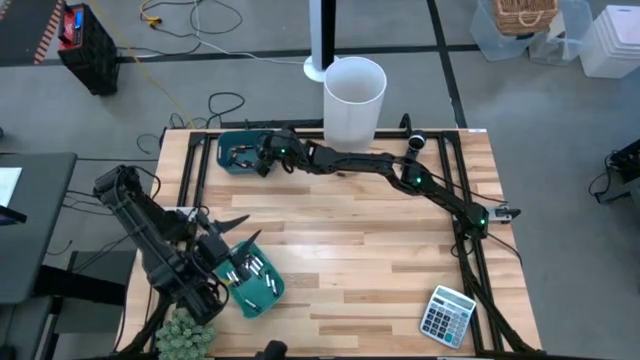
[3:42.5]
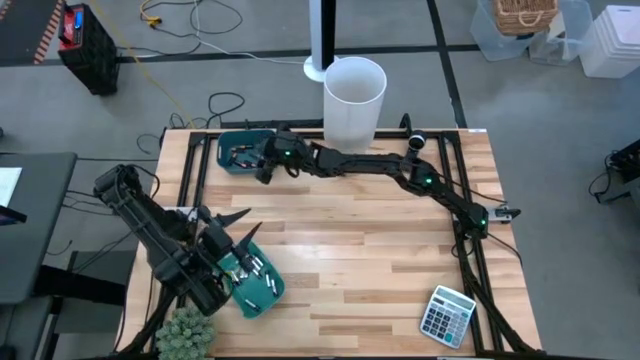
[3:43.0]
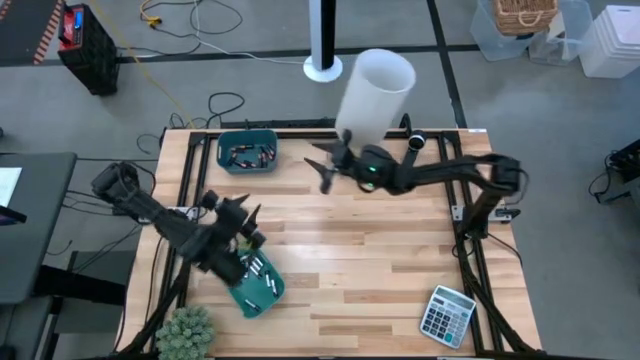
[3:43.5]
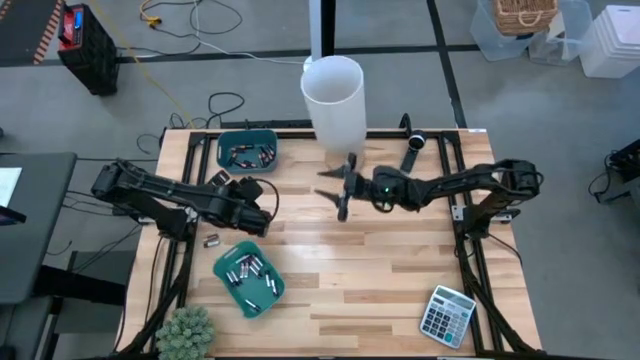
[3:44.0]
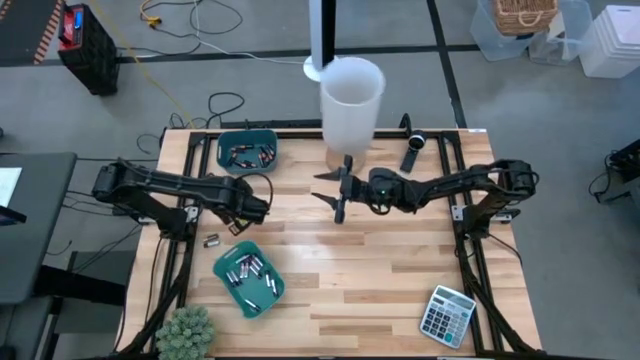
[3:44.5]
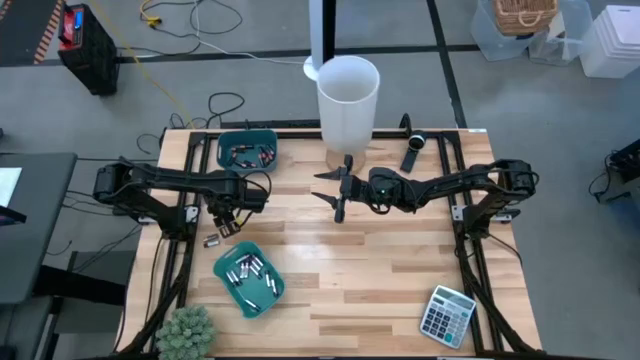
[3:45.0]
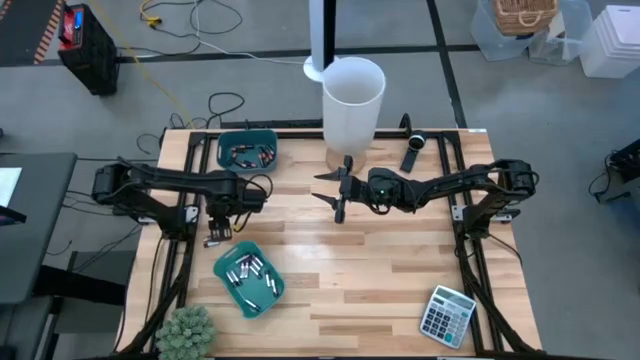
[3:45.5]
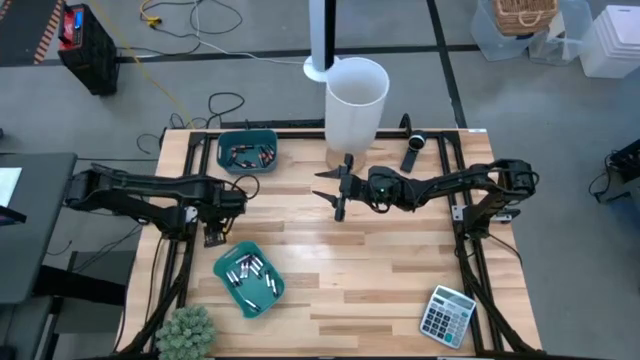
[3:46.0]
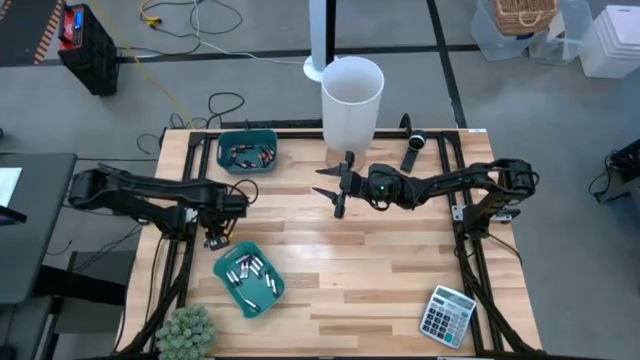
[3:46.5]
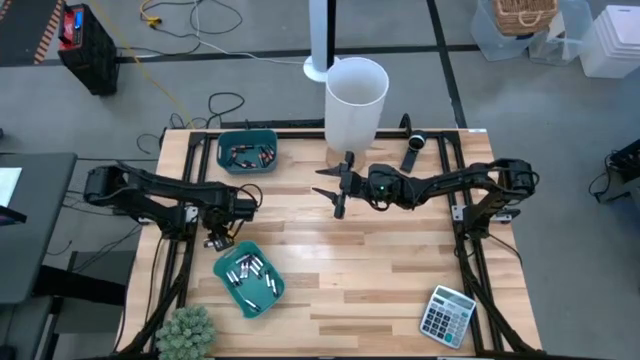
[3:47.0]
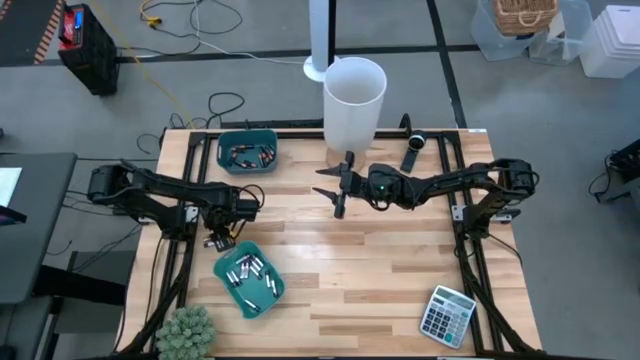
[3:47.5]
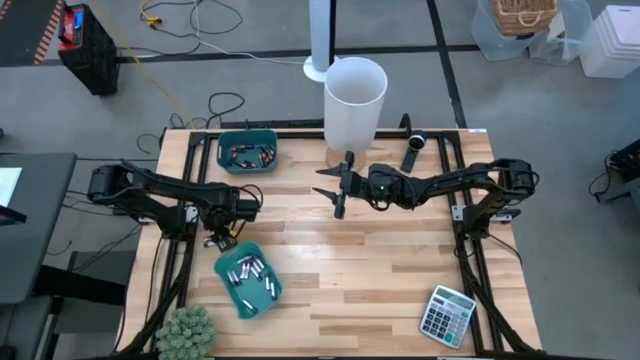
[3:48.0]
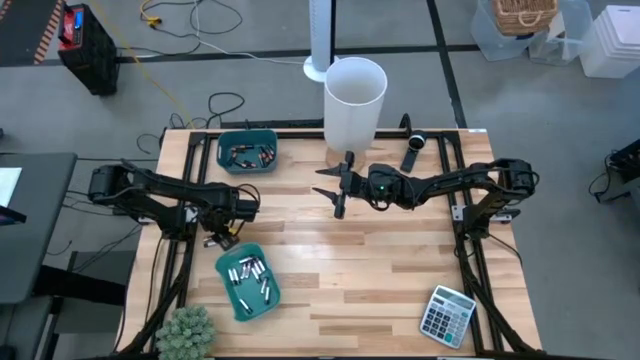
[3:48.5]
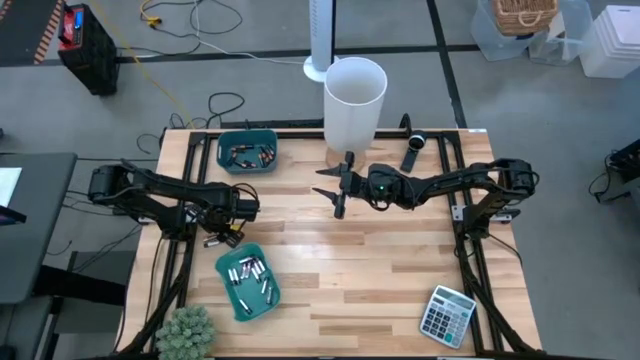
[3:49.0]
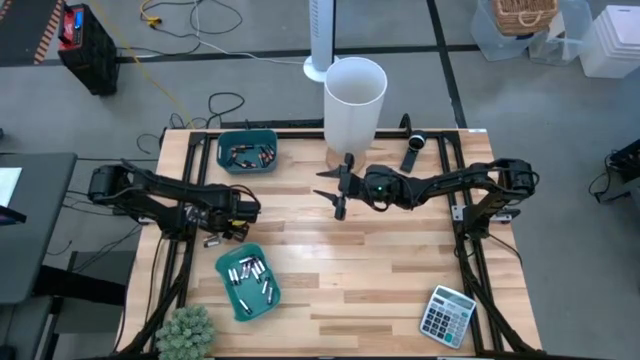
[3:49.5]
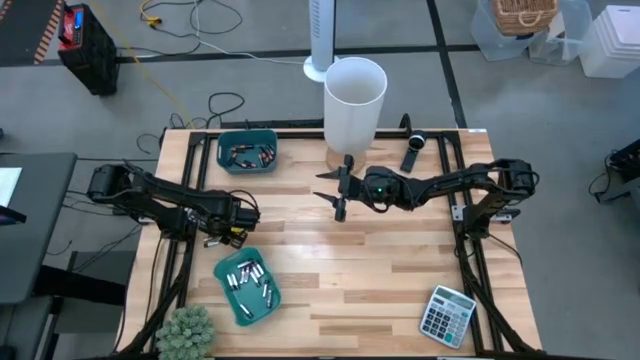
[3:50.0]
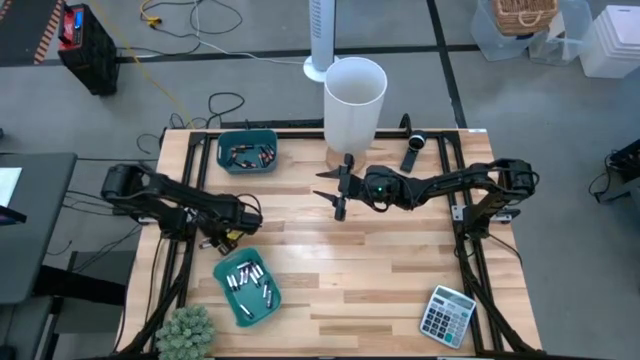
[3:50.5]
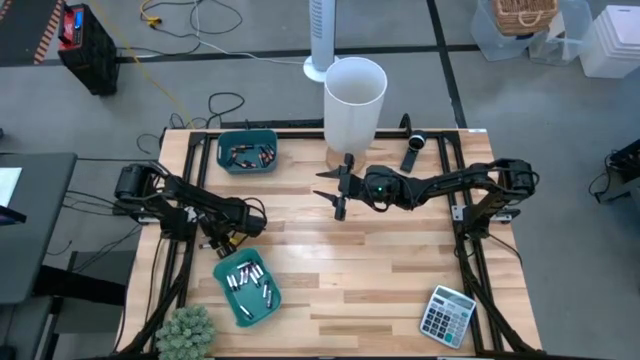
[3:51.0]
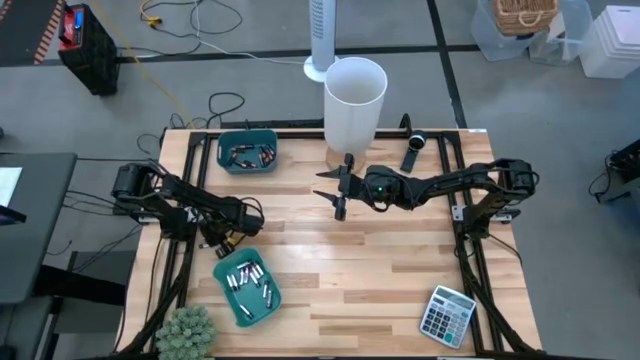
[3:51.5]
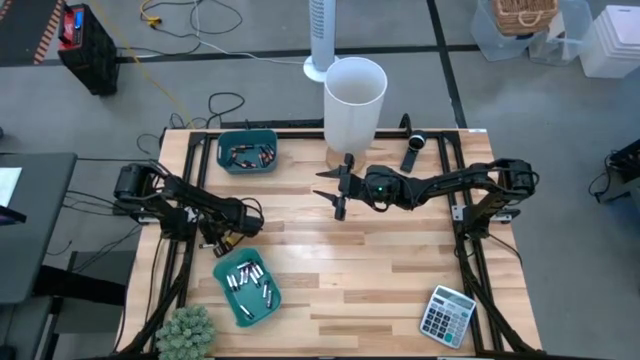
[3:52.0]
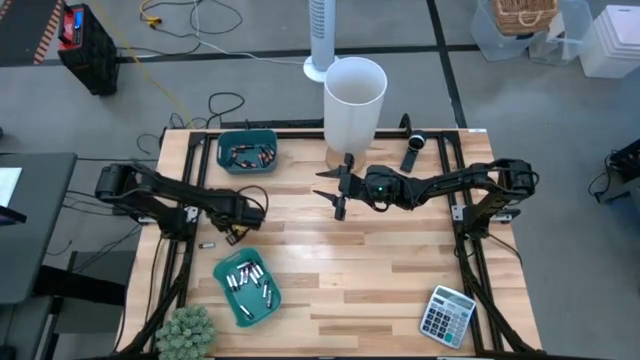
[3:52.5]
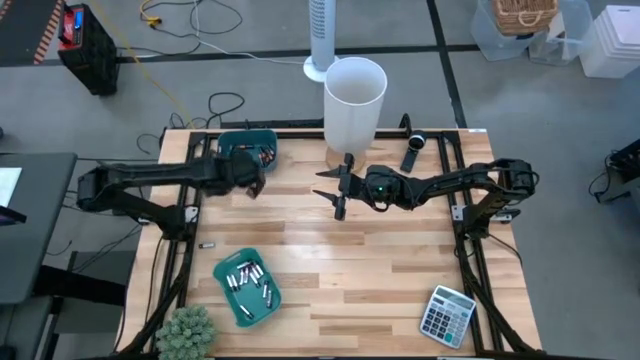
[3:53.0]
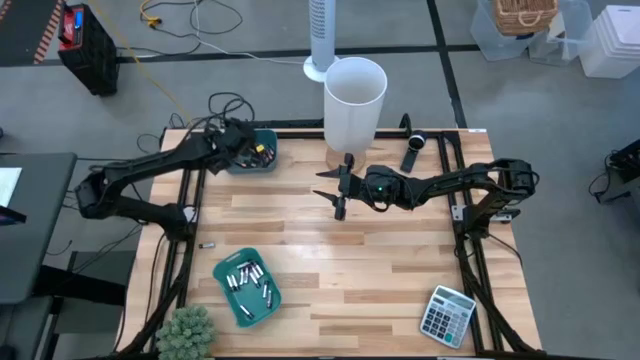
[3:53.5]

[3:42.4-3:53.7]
Task: Sort batteries
Put the black battery into the blue bin

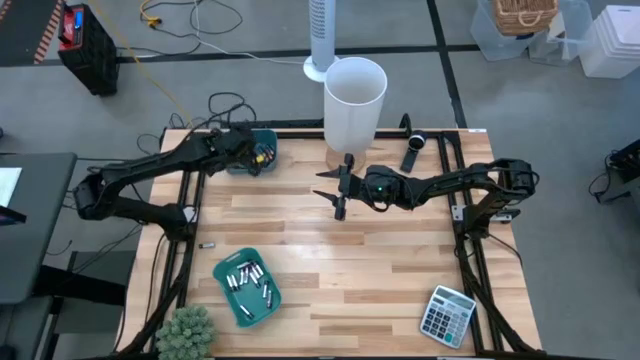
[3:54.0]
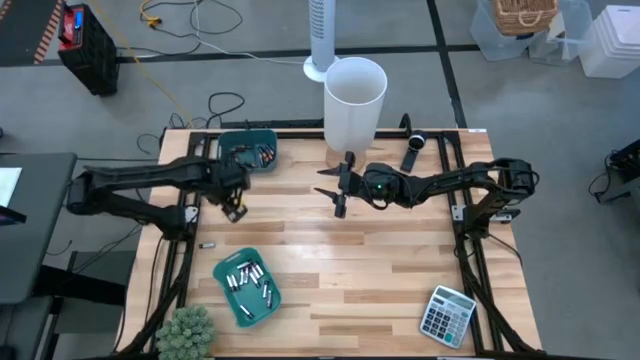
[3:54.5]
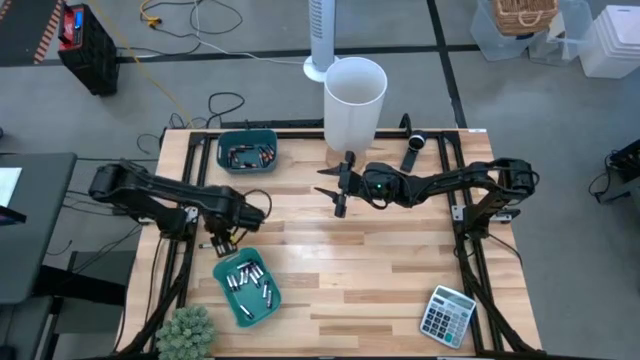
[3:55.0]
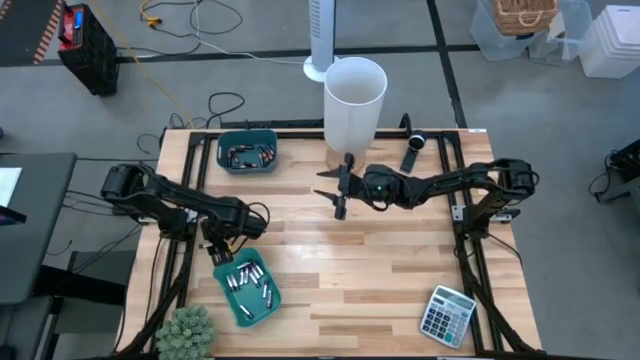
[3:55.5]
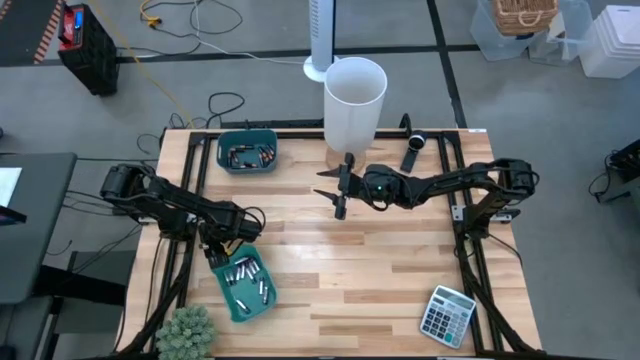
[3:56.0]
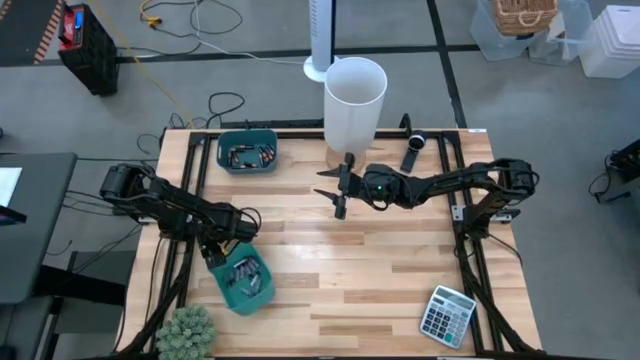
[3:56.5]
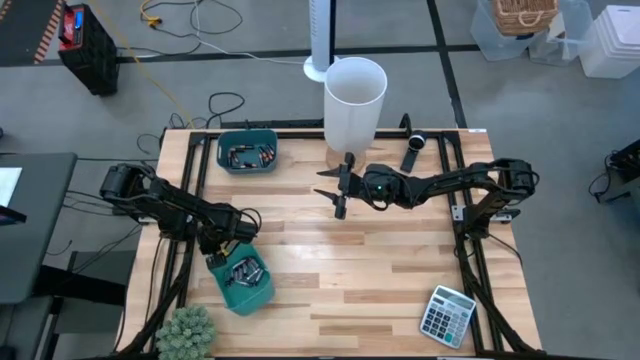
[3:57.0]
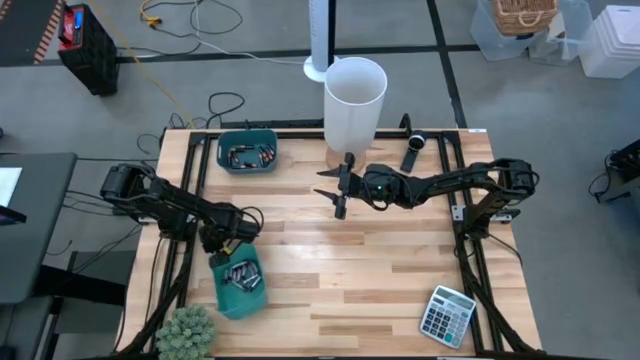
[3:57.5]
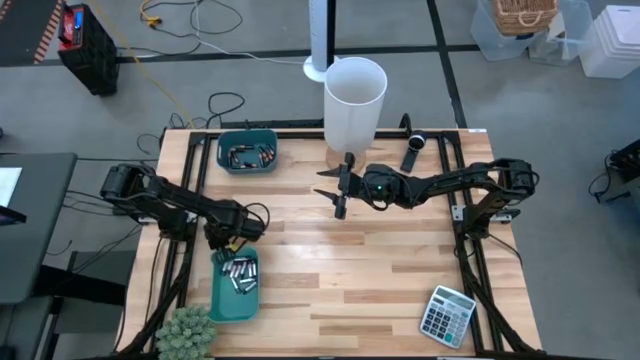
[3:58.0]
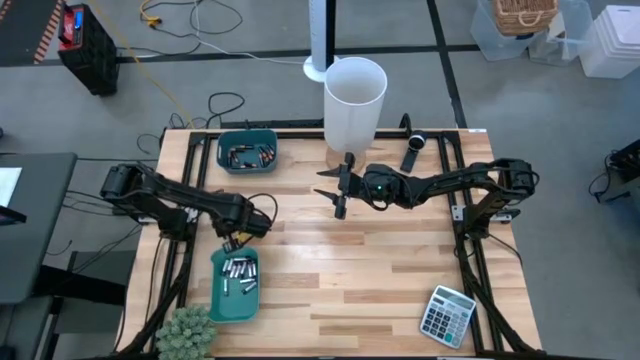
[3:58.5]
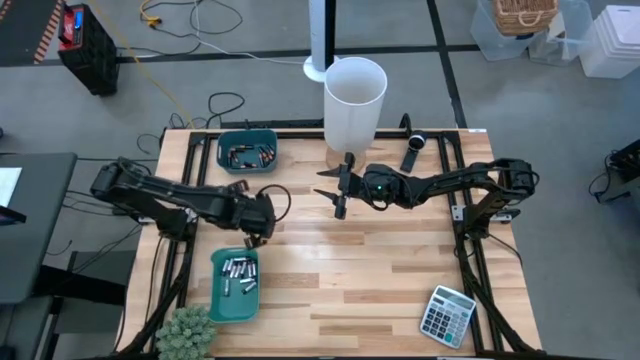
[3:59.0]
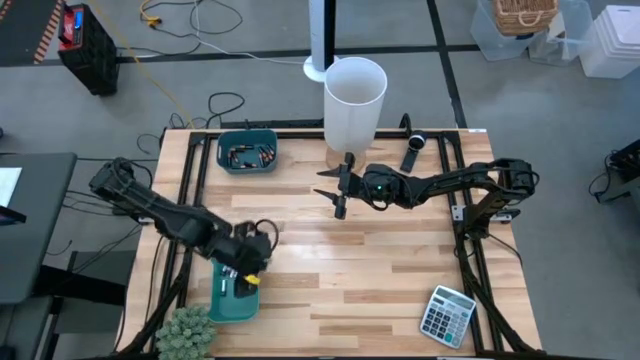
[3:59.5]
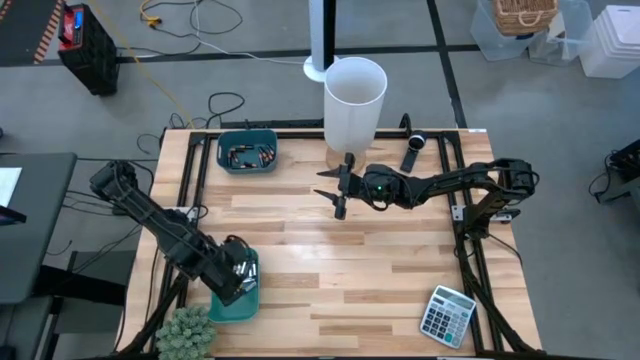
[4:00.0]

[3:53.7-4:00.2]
Put the silver battery into the green bin

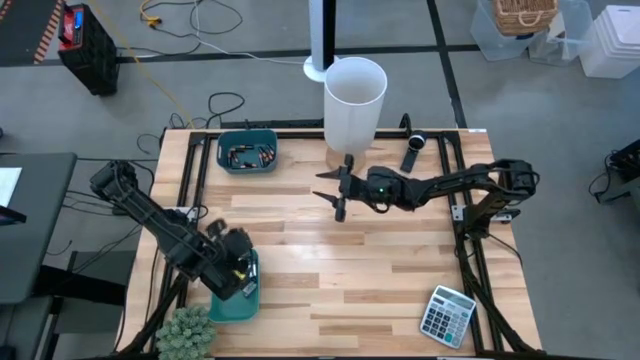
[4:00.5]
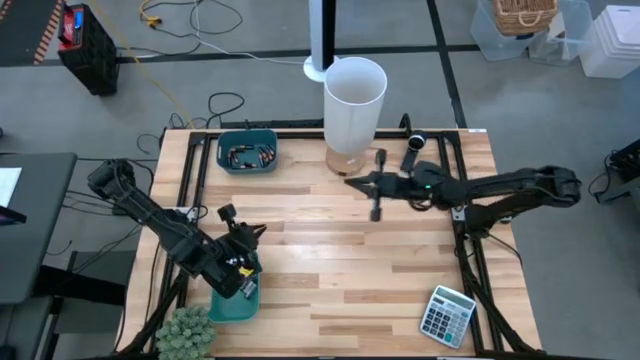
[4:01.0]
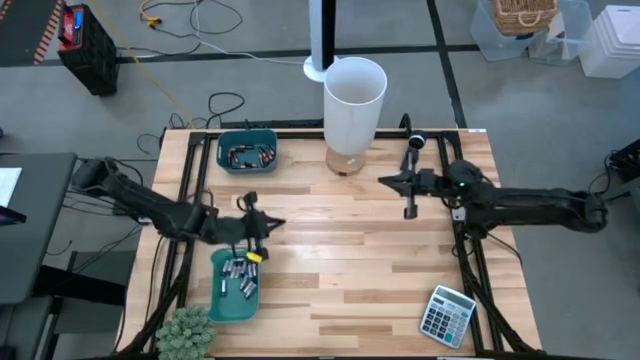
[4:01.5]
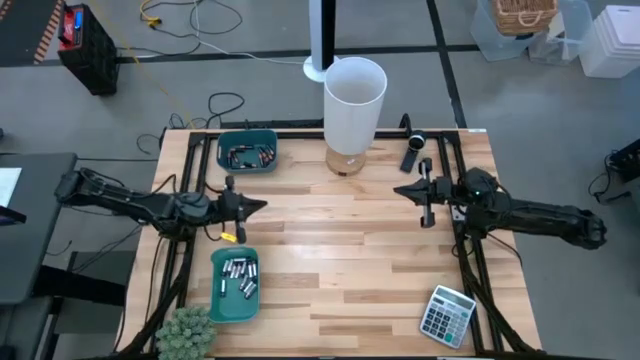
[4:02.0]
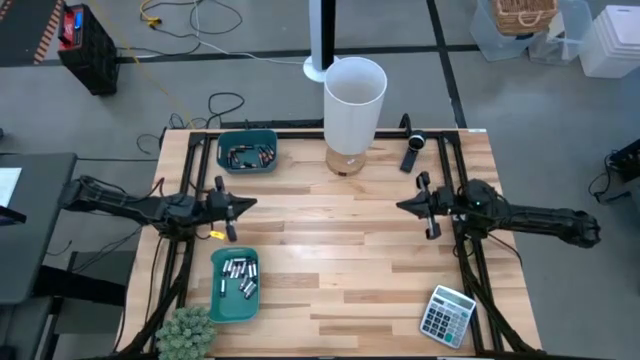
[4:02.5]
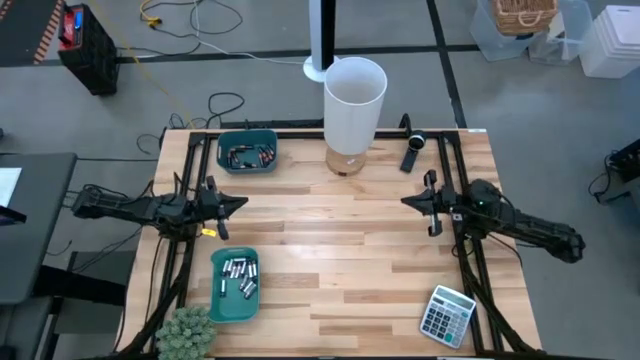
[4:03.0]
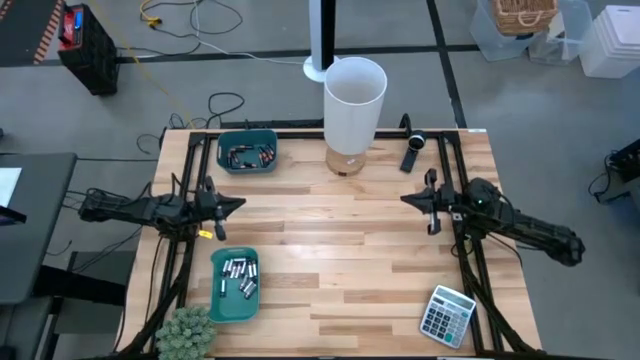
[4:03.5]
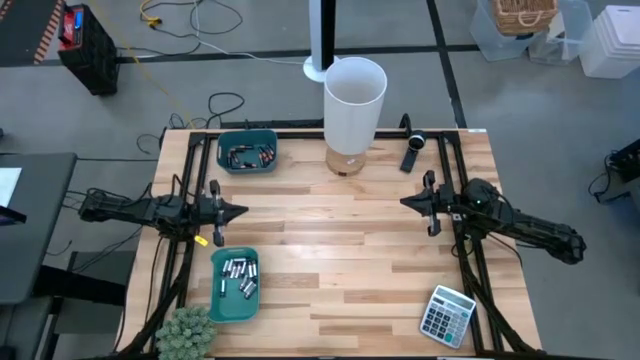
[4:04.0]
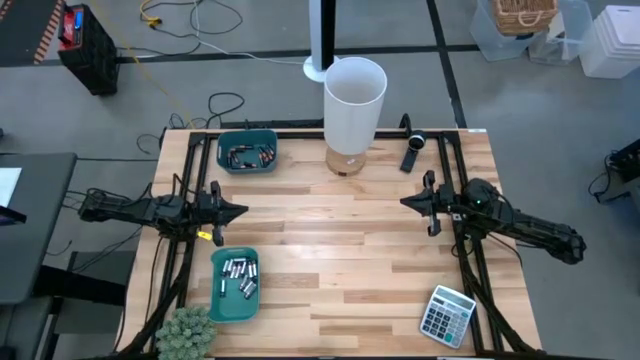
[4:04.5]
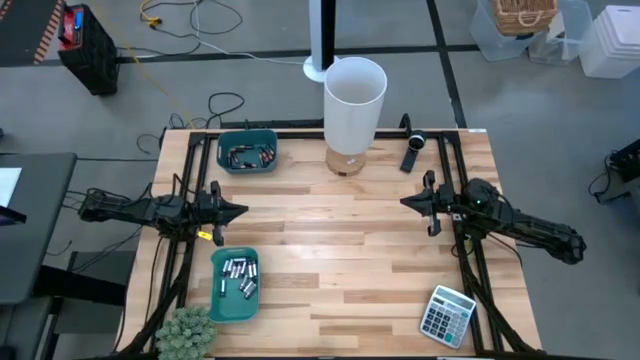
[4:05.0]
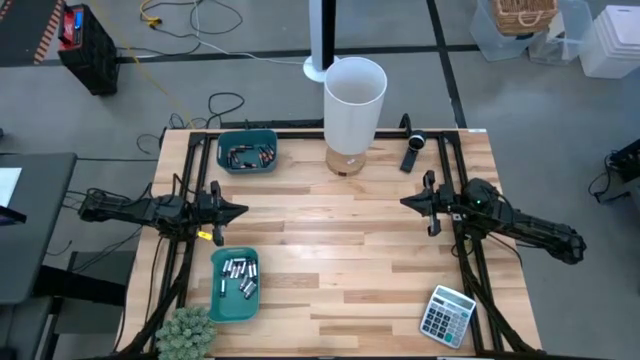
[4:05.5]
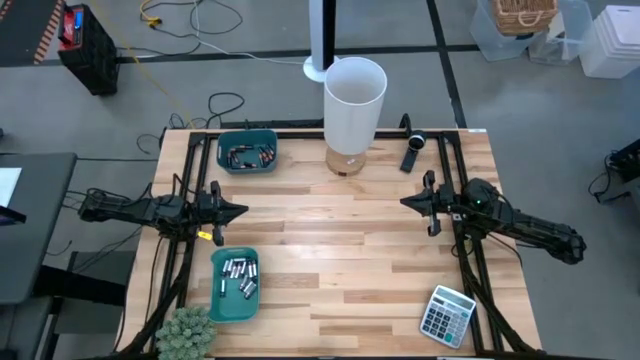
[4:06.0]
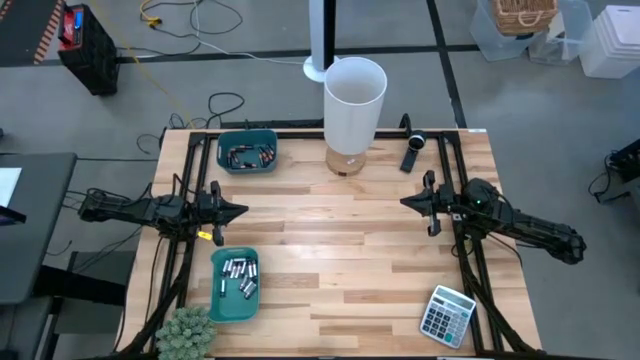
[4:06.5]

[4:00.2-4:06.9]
Return to Home Position
